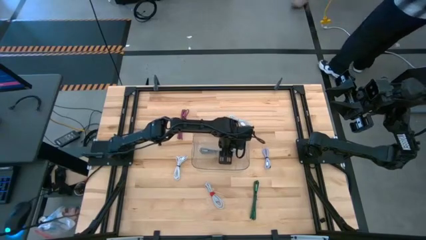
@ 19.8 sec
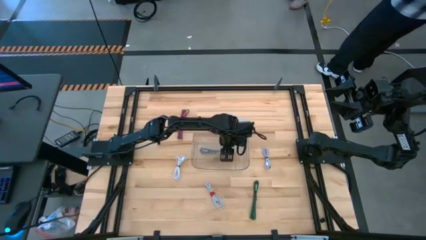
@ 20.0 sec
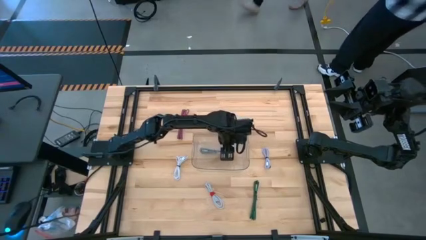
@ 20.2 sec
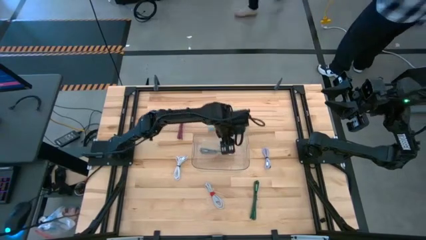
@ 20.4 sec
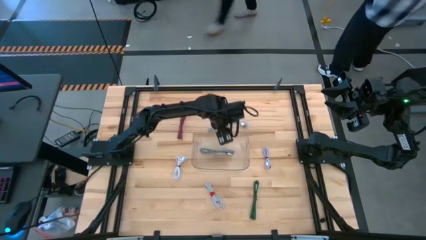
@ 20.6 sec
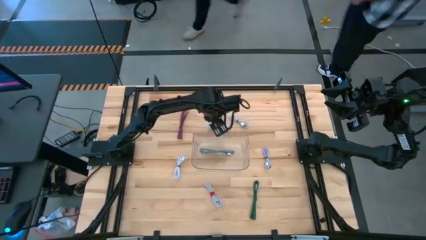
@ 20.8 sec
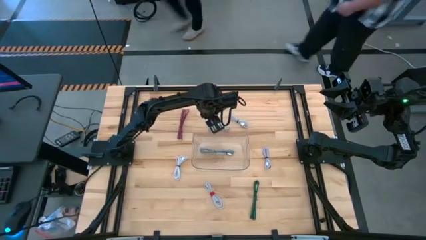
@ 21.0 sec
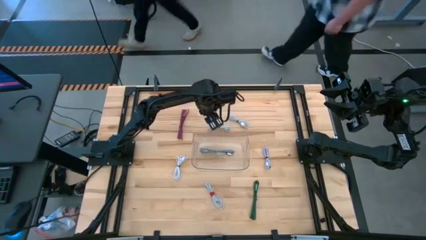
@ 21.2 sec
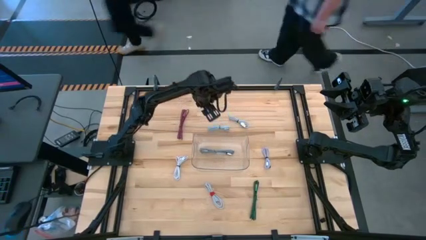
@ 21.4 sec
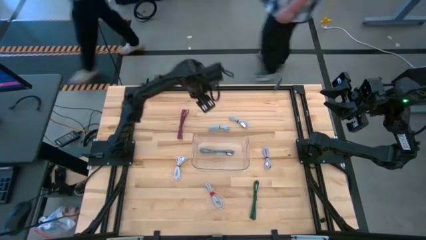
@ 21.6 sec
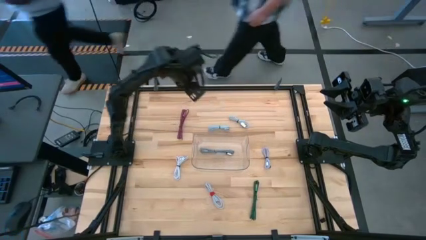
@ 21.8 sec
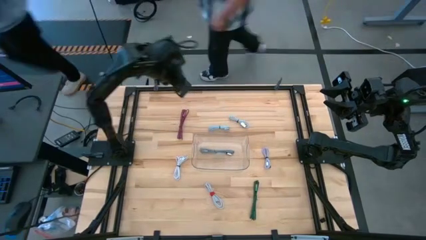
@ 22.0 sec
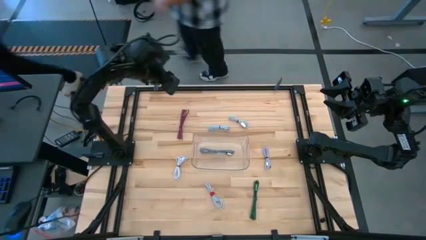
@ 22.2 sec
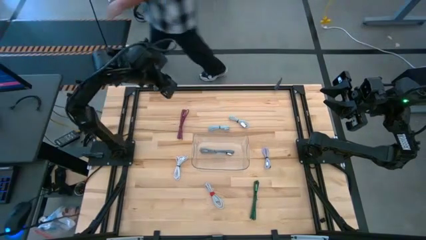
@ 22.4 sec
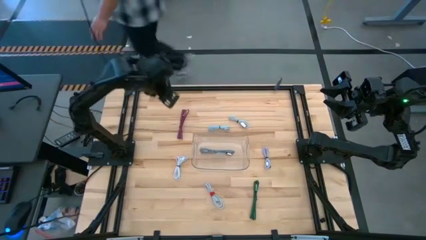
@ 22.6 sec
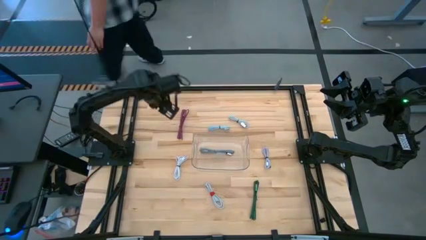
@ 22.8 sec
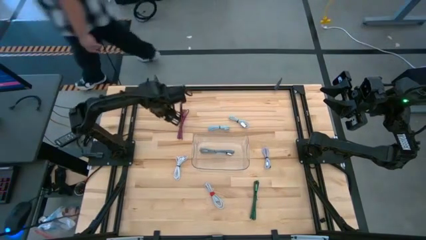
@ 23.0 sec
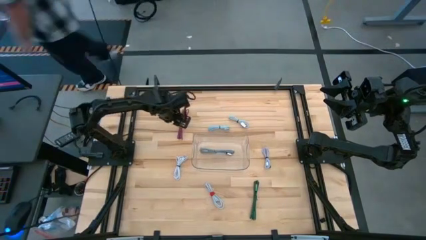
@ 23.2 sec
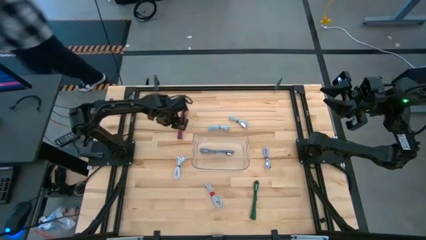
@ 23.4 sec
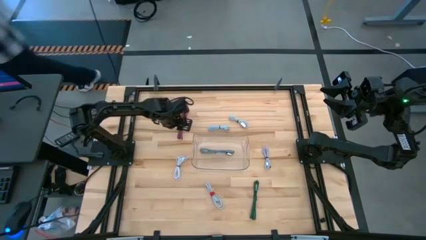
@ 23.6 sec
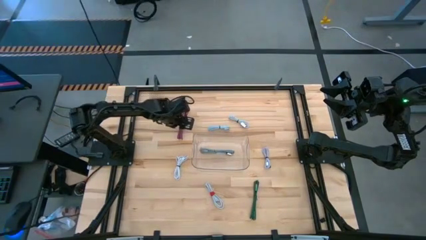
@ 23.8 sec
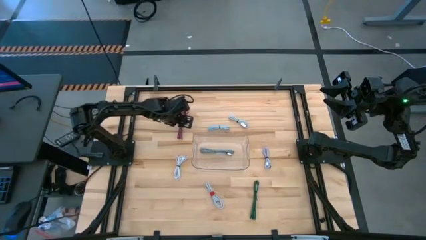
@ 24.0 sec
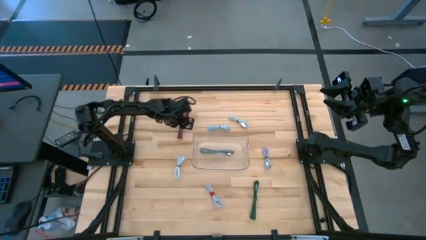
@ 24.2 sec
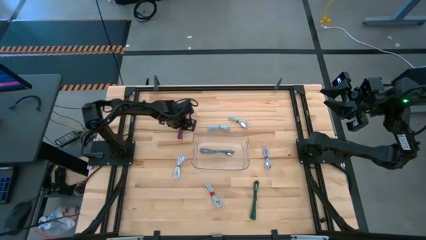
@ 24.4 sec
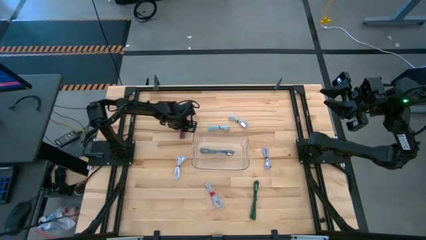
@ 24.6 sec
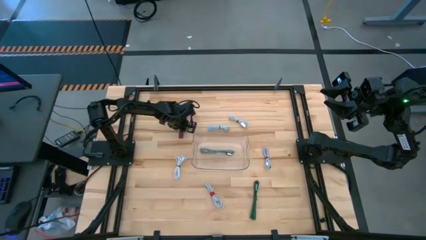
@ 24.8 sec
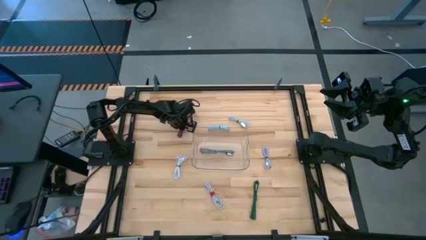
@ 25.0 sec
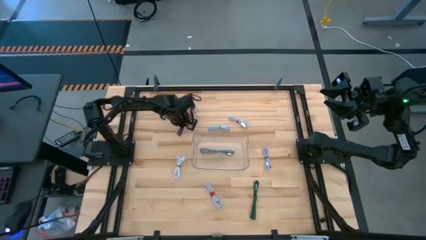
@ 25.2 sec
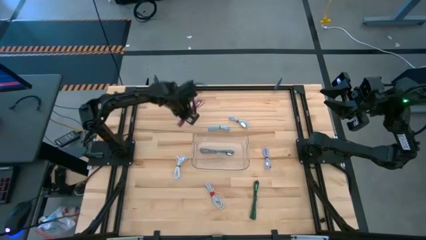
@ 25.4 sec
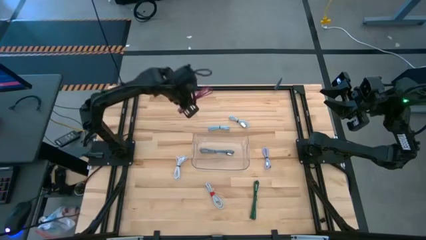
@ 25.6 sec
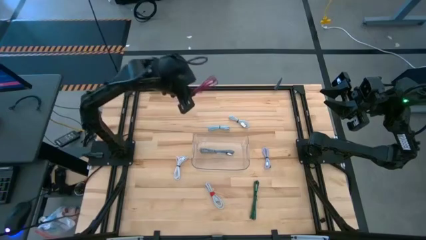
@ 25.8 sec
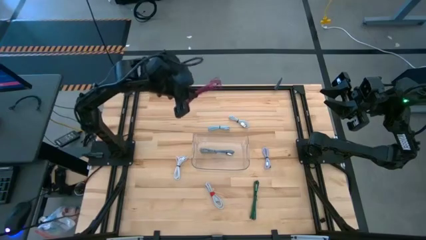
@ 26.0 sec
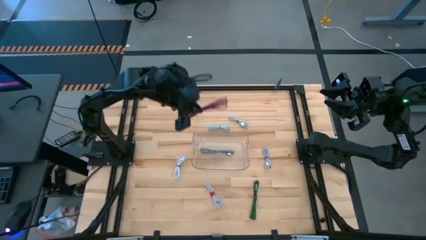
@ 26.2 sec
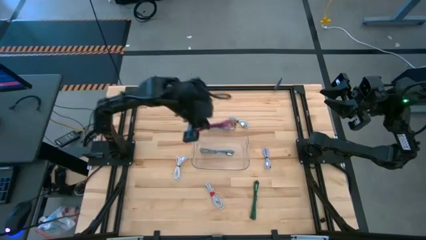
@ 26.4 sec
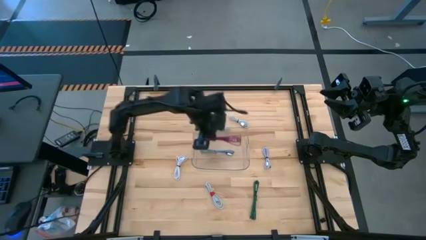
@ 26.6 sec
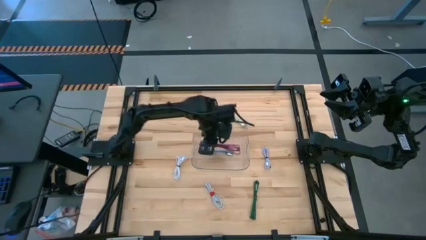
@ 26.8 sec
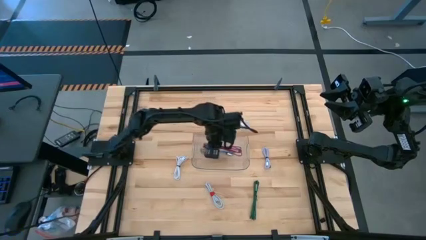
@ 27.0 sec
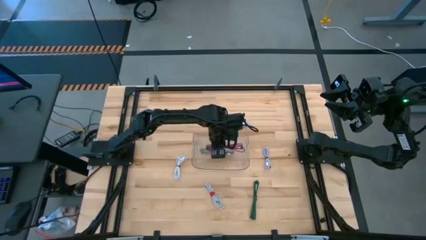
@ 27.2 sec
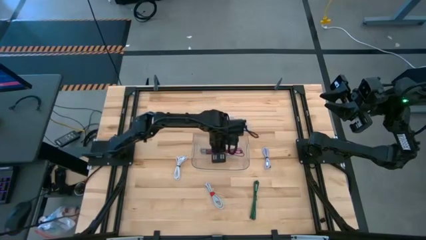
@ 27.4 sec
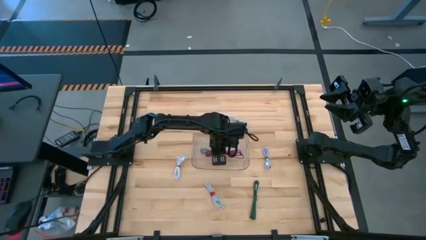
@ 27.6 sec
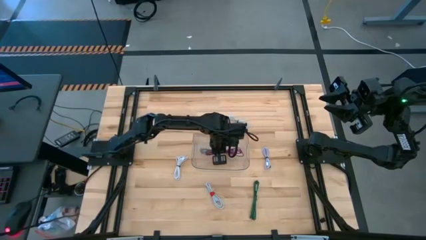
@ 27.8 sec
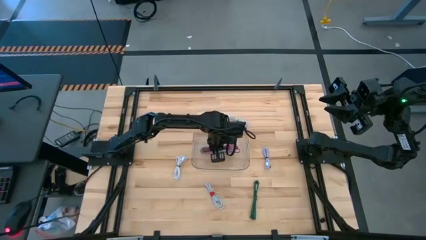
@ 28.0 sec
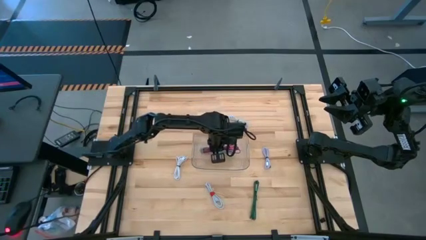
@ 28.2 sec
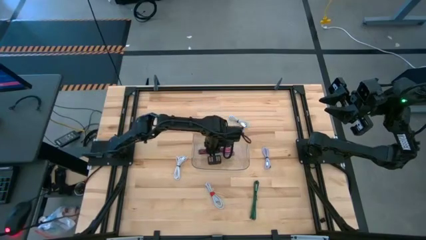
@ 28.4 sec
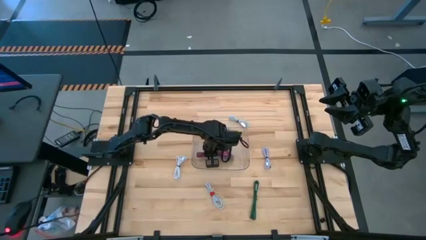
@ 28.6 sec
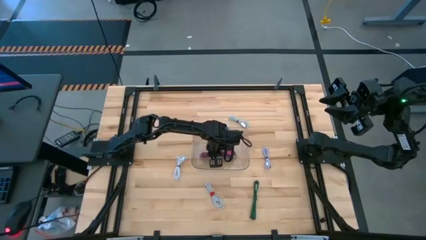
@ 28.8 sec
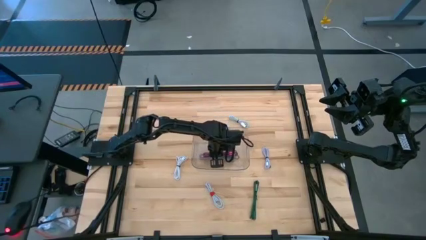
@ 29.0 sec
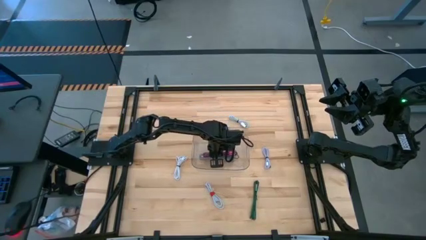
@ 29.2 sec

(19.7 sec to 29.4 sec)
Task: Pick and place USB-C Cables
Put the pink patterned charger cable into the transparent bin

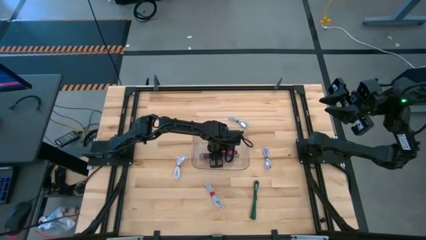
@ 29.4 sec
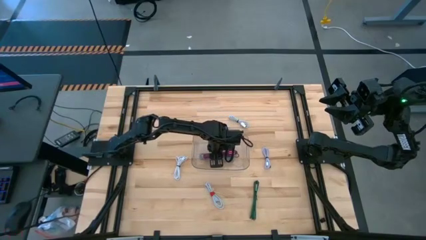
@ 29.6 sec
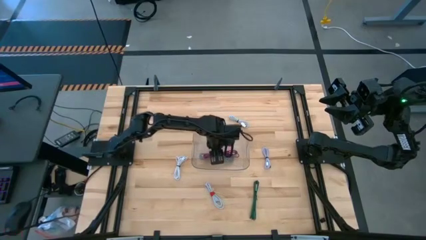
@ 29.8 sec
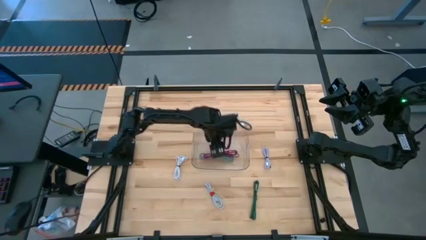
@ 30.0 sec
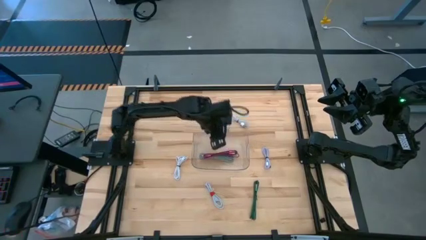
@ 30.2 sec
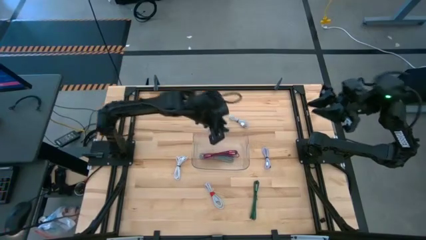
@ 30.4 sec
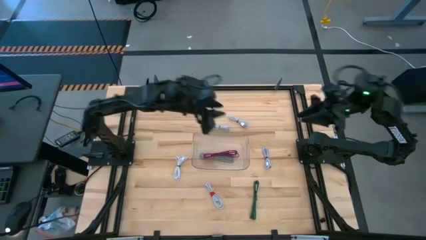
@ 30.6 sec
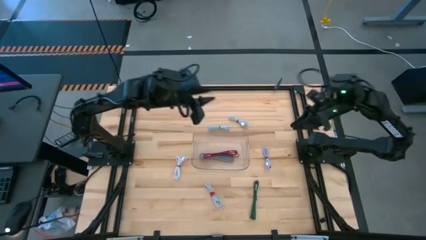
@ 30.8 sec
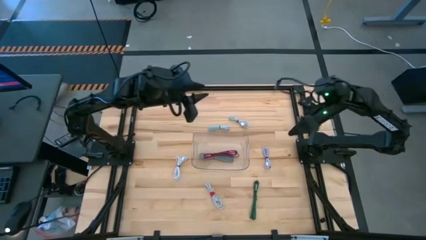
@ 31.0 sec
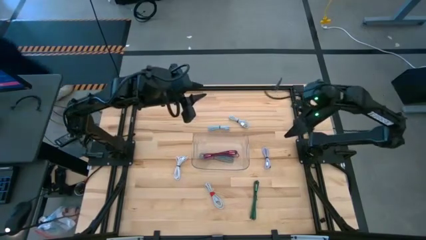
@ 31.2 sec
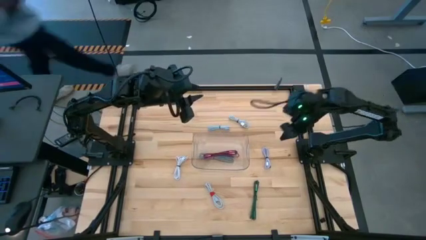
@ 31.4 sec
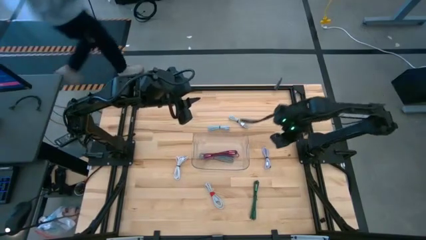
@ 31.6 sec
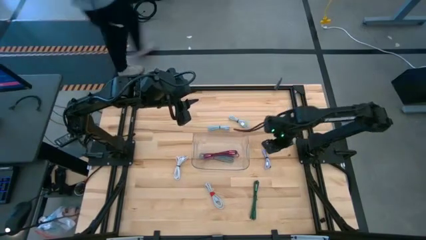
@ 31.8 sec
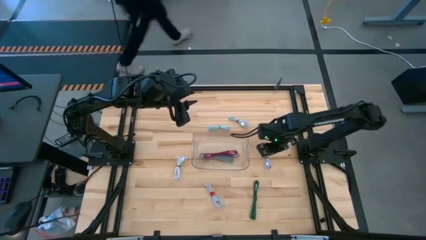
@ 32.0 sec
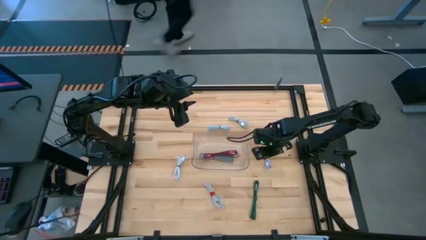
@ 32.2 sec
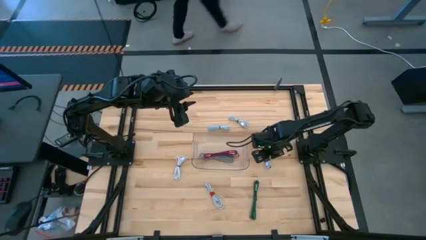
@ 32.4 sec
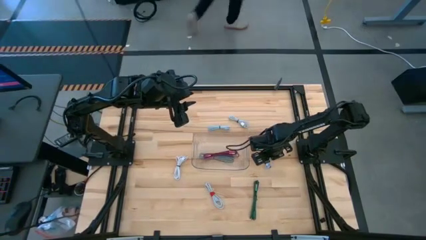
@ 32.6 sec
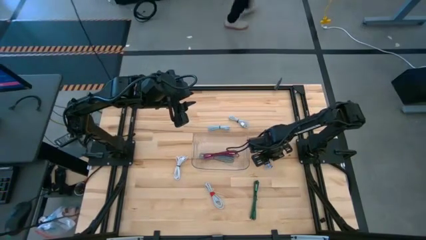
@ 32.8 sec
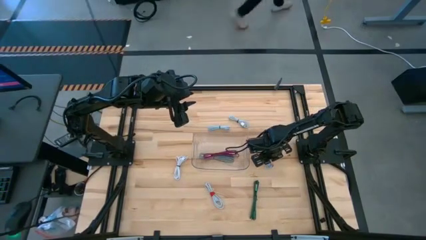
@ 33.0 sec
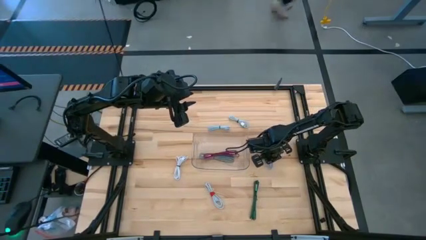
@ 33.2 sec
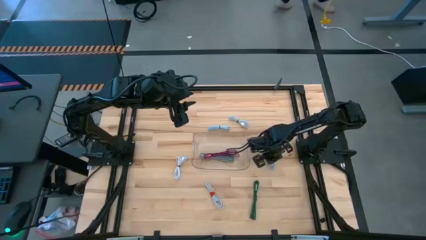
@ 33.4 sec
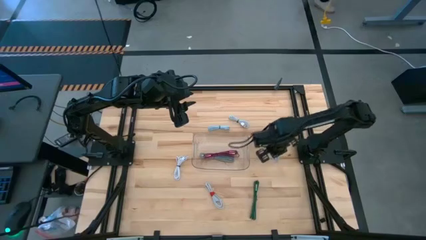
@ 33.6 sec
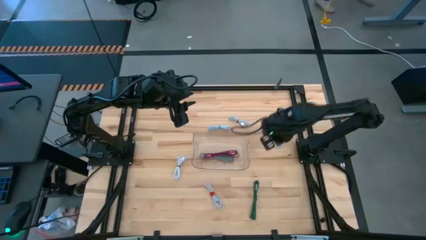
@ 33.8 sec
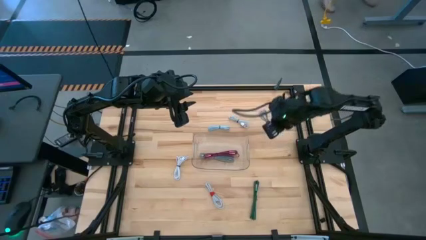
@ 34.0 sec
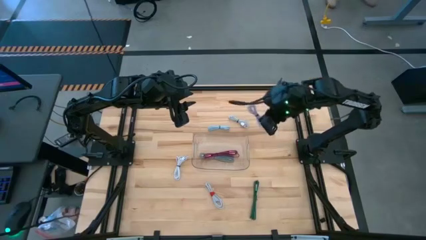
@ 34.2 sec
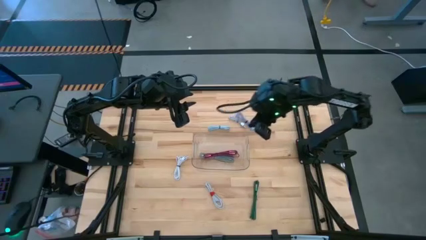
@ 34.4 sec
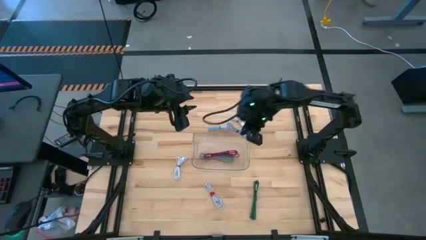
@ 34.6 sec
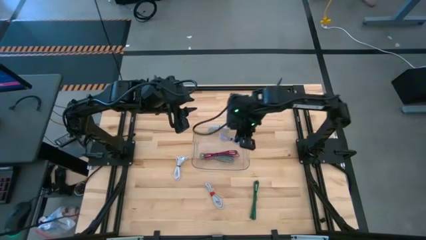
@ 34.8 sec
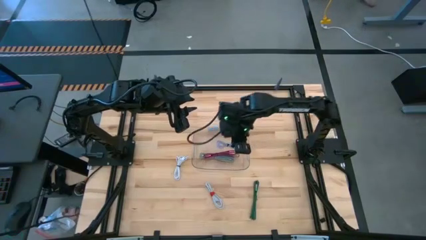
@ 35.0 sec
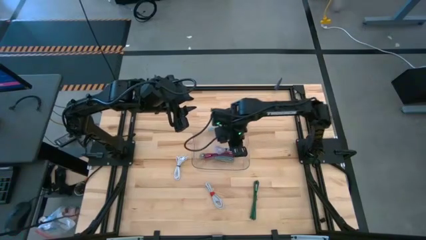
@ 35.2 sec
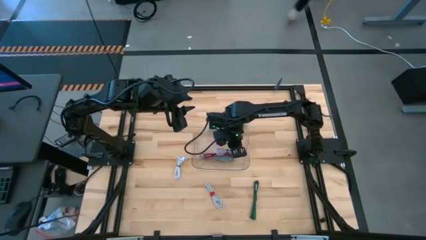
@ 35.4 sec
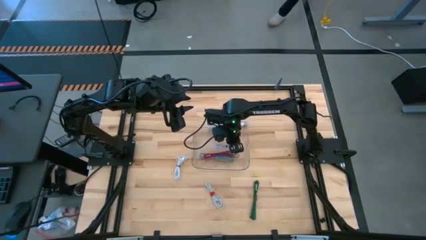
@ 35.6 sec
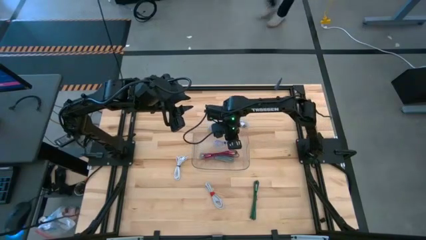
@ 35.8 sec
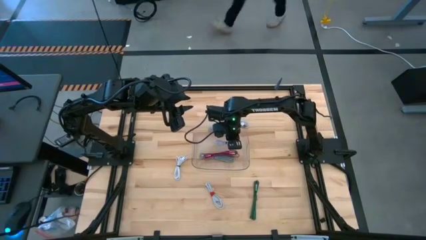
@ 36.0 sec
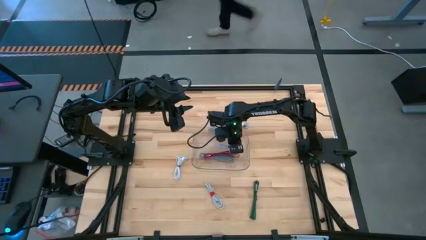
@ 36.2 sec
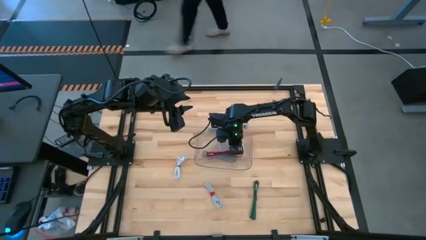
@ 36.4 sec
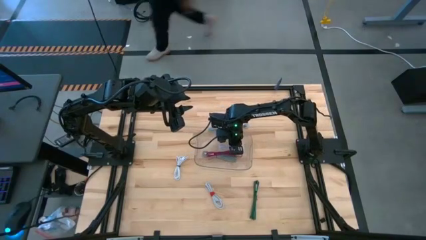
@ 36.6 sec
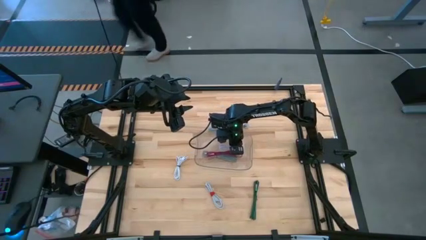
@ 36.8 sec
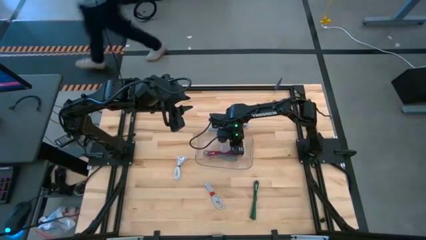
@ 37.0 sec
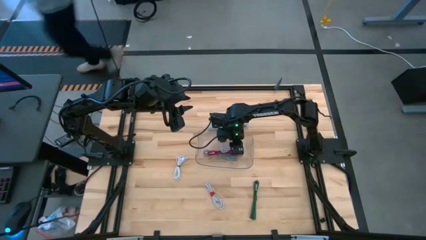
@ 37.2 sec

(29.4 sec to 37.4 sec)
Put the purple charger cable into the transparent bin
